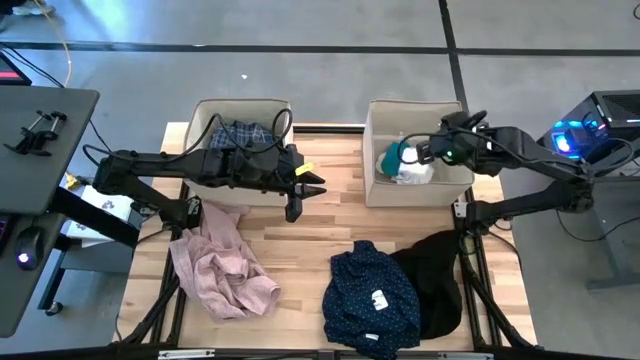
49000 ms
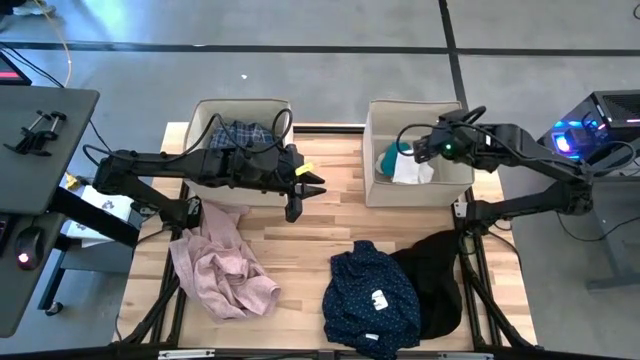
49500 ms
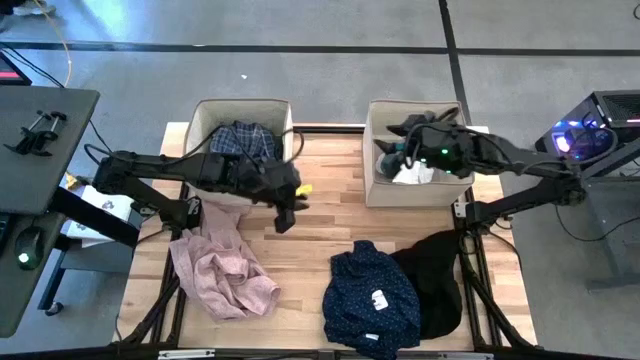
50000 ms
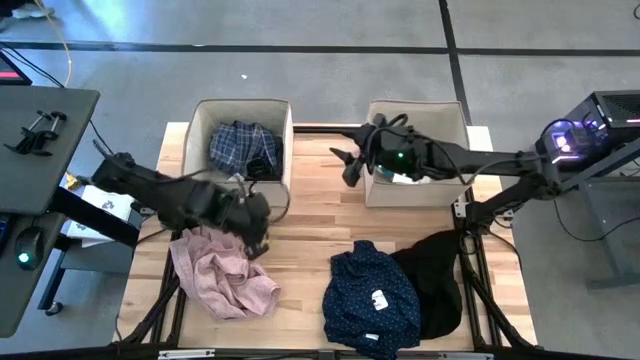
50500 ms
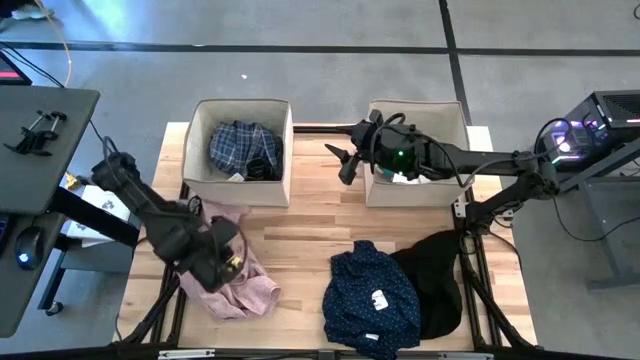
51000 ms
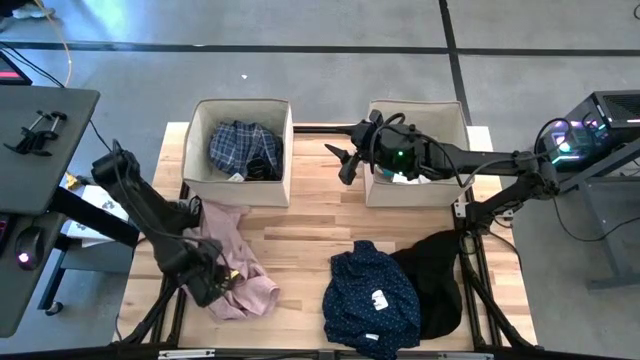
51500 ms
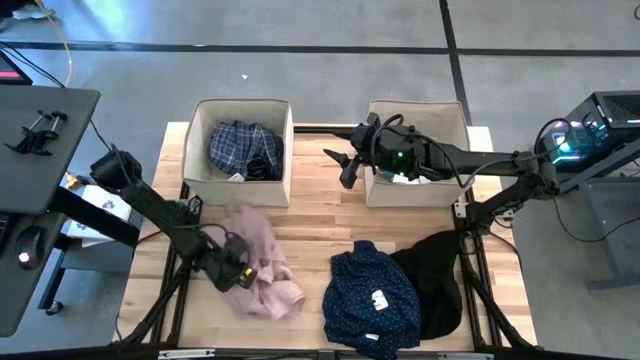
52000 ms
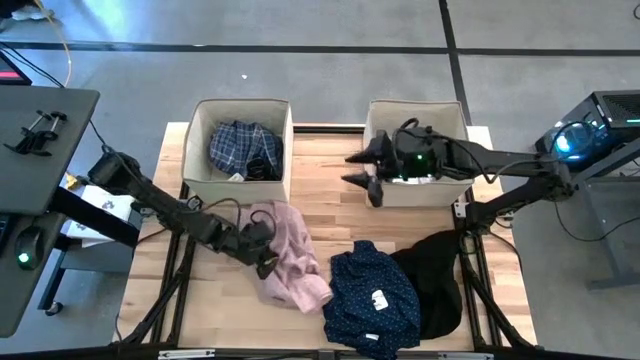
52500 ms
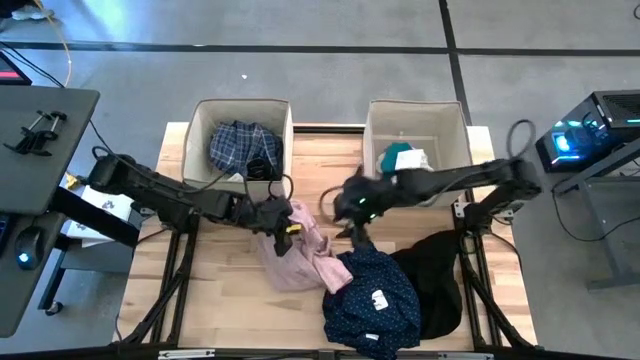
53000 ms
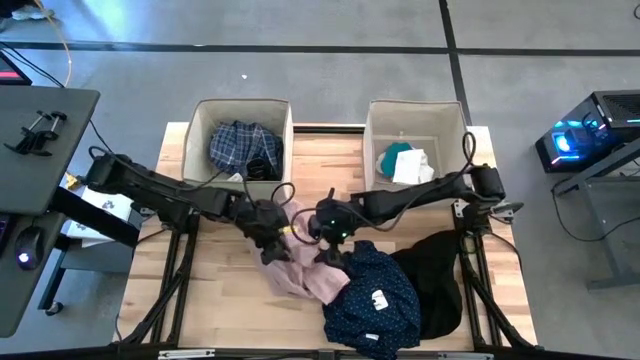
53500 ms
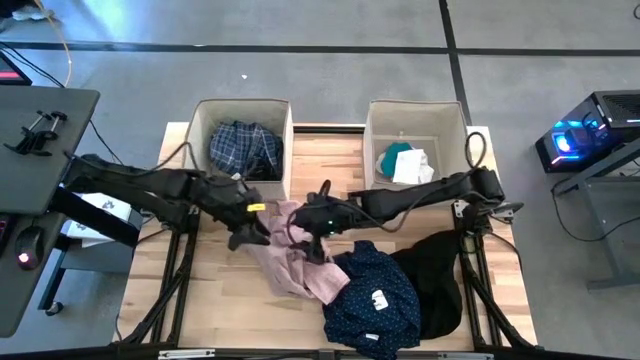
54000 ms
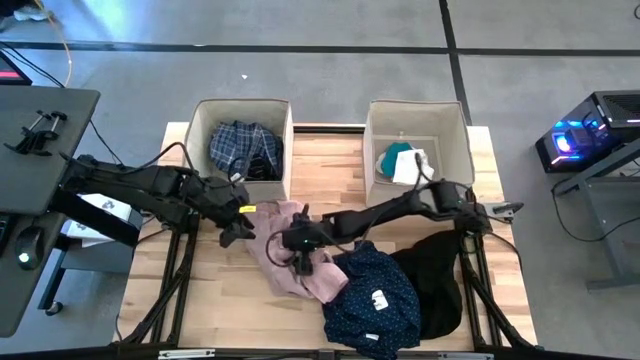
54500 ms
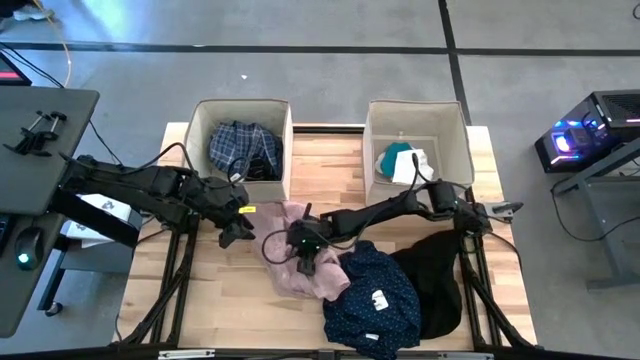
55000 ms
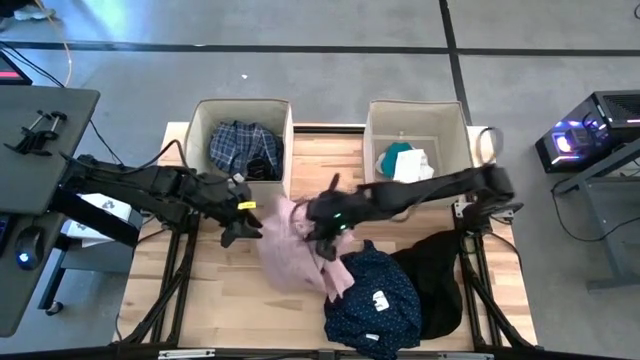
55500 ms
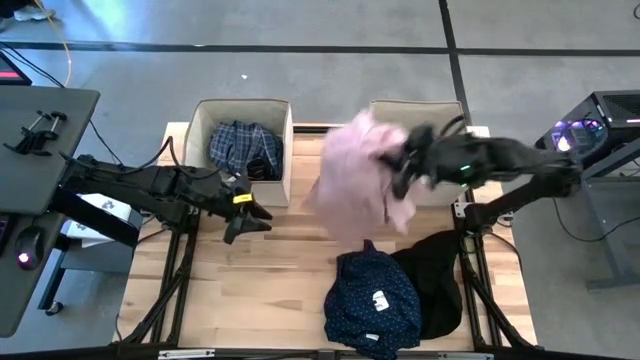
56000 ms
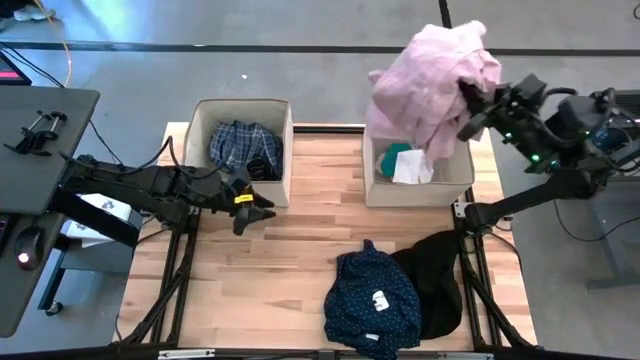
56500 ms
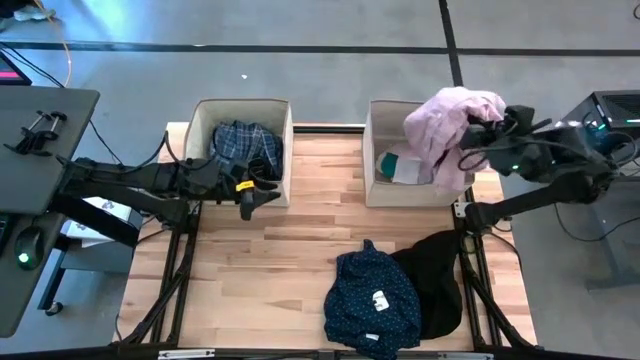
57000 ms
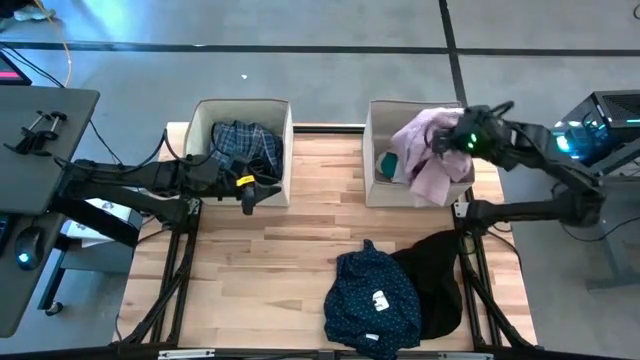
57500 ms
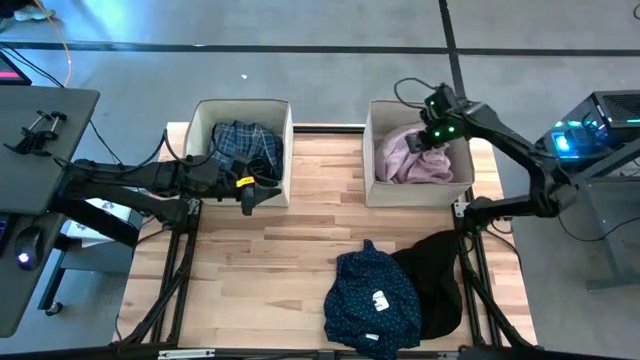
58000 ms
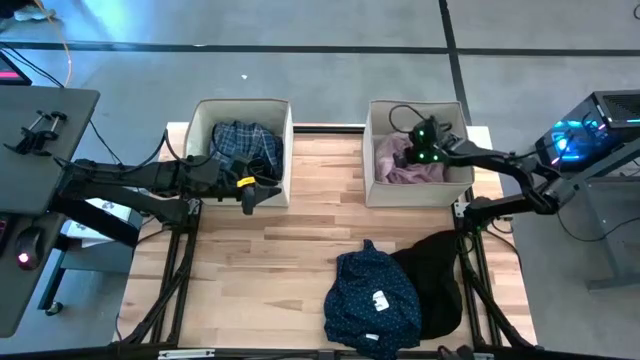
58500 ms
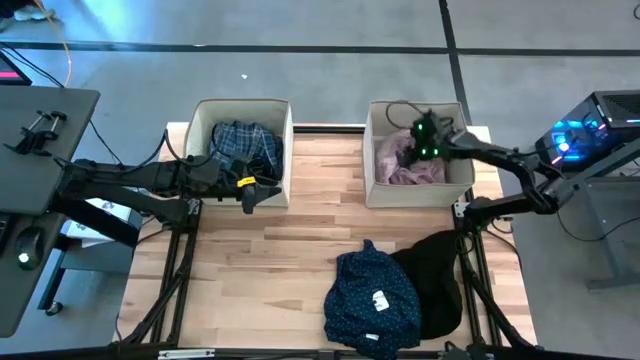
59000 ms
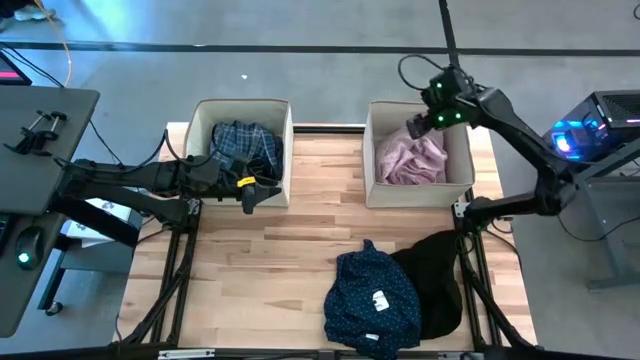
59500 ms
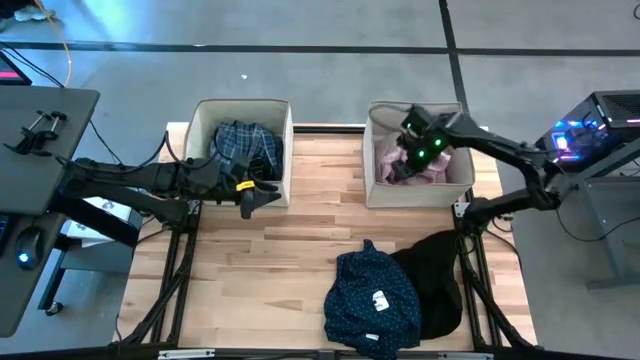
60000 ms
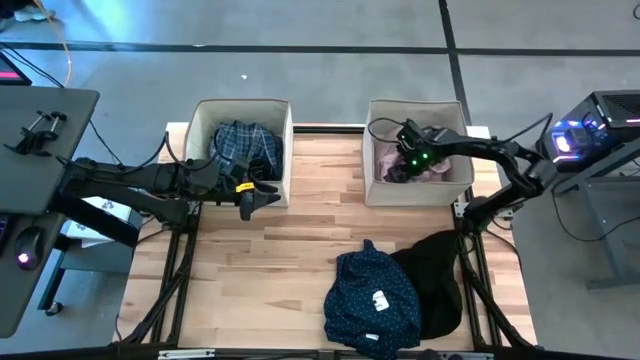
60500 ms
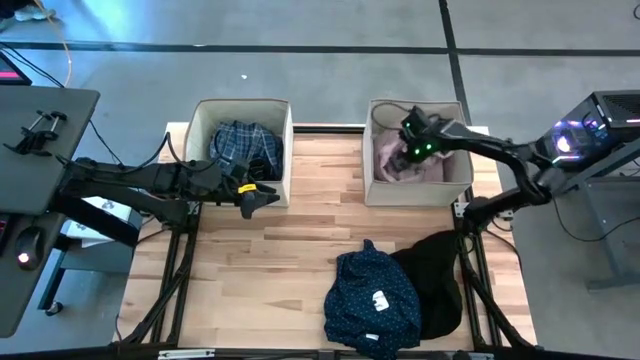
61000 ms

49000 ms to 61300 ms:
Task: Sort clothes
Put the pink cloth into the right laundry organizer

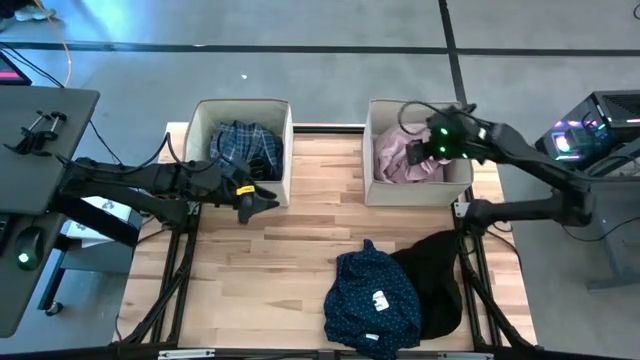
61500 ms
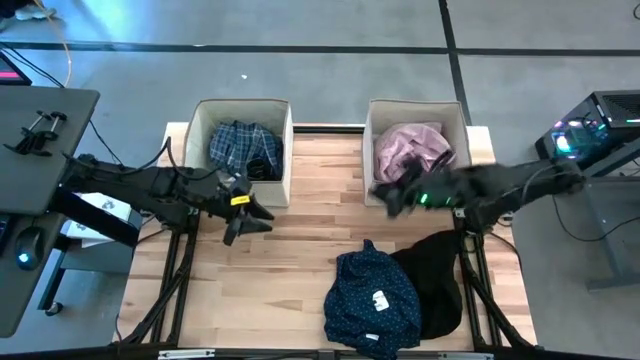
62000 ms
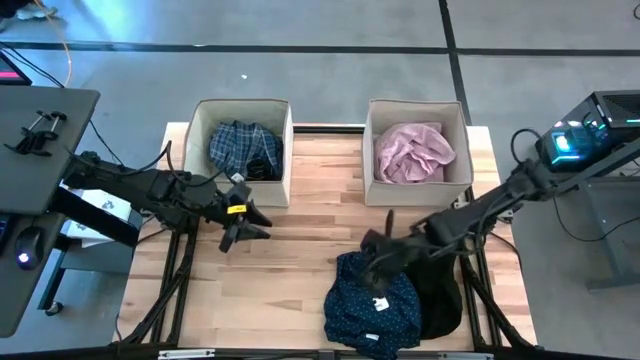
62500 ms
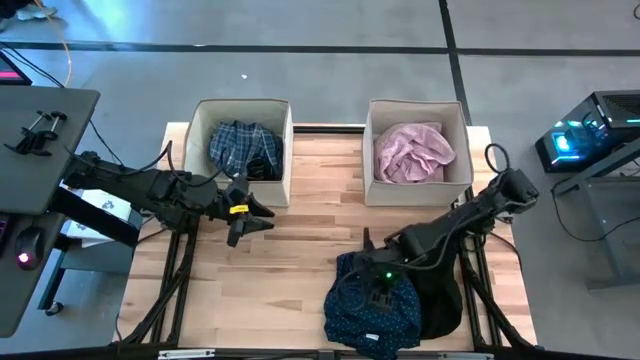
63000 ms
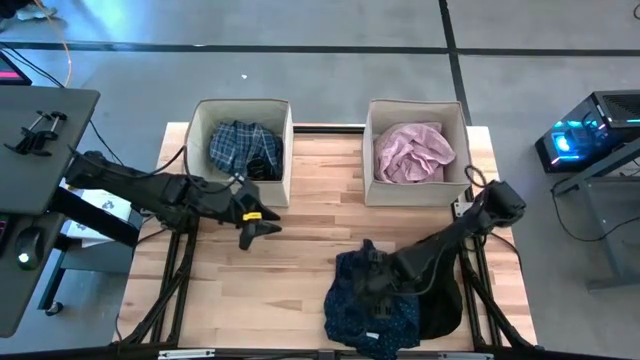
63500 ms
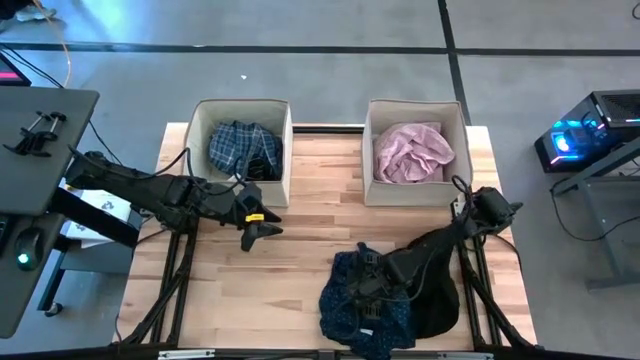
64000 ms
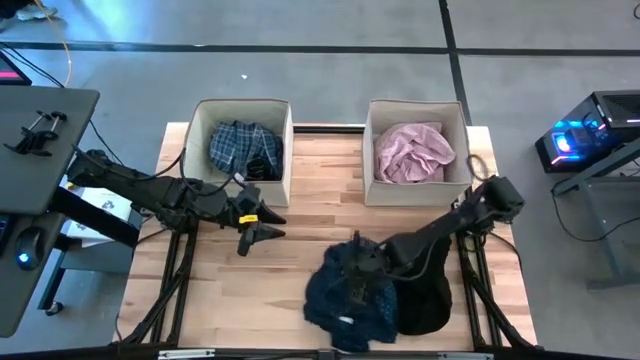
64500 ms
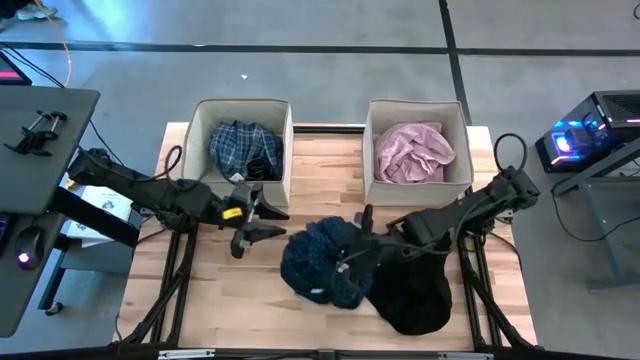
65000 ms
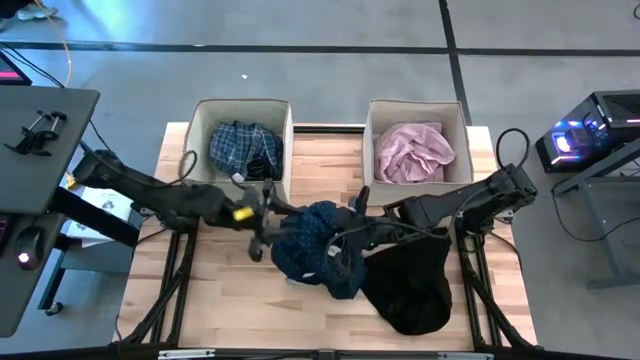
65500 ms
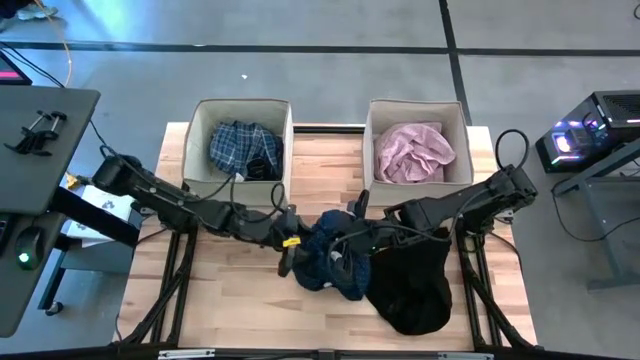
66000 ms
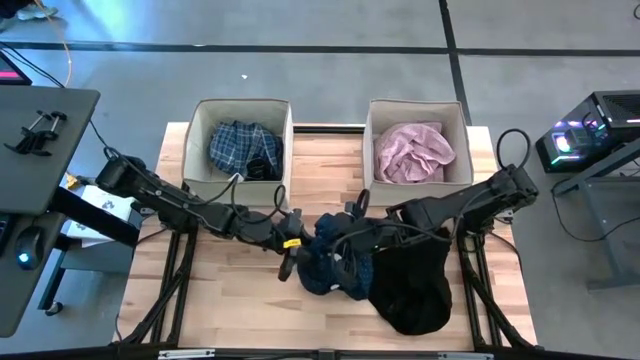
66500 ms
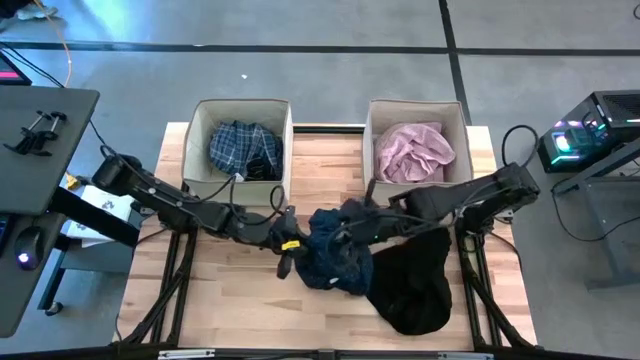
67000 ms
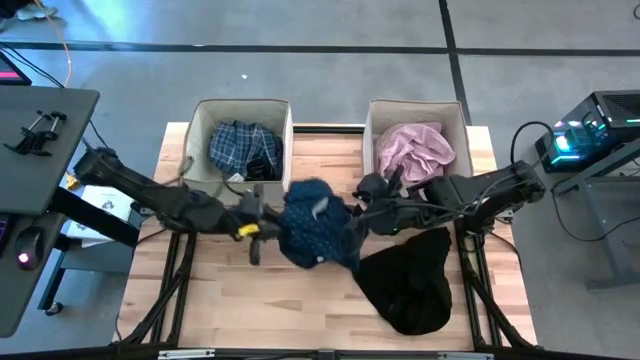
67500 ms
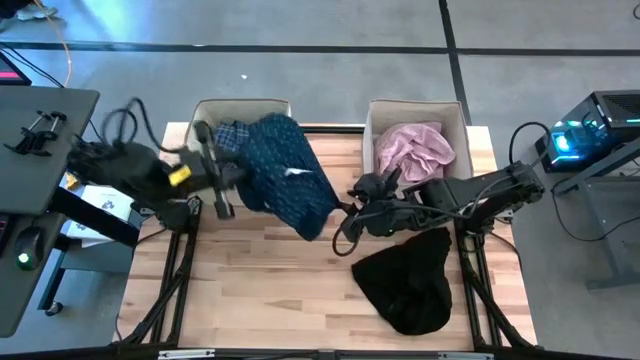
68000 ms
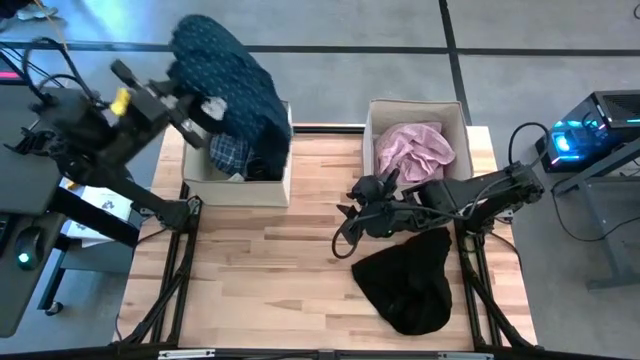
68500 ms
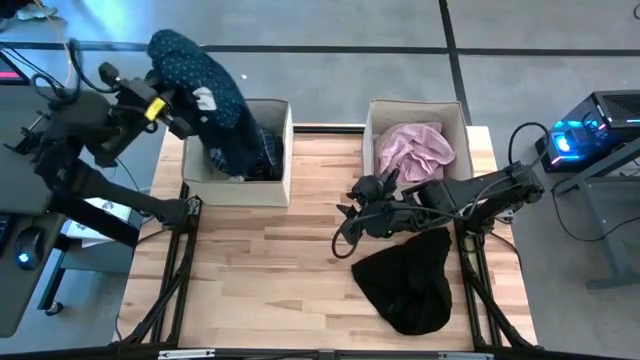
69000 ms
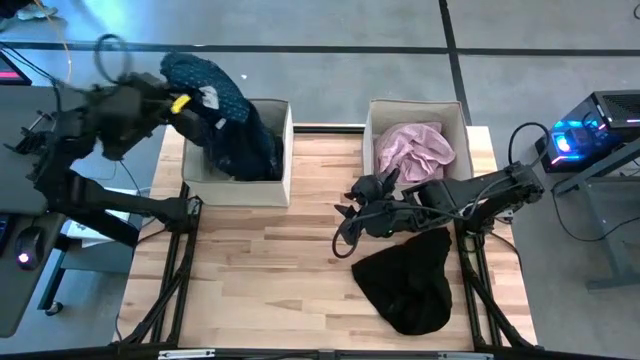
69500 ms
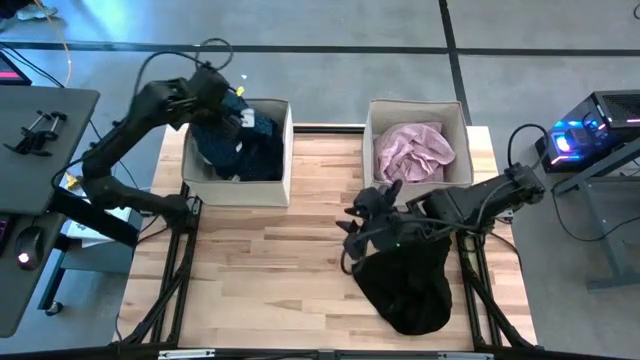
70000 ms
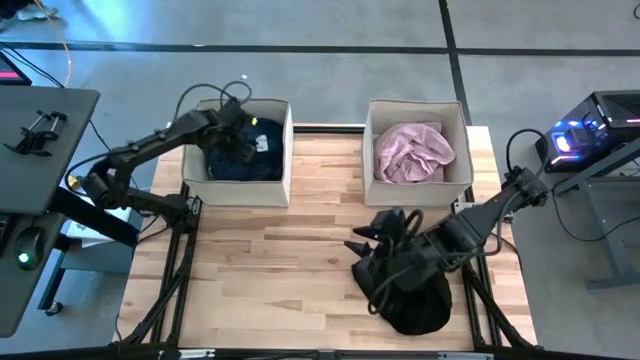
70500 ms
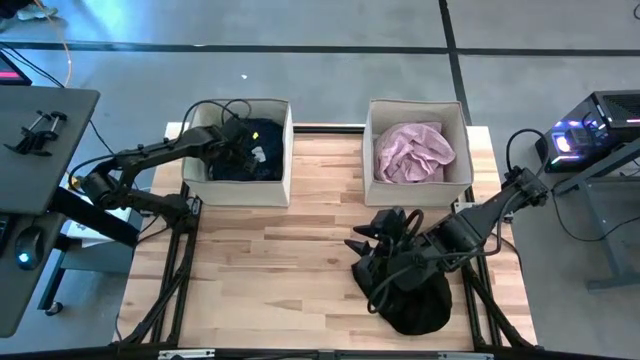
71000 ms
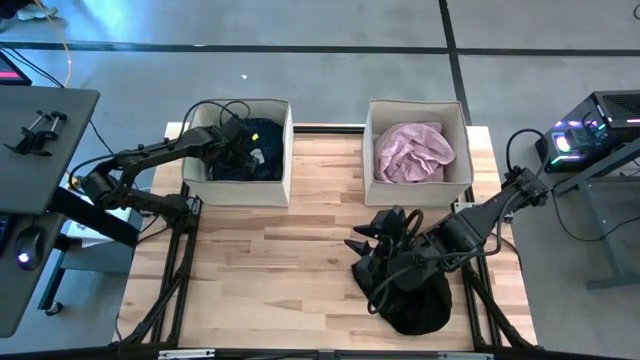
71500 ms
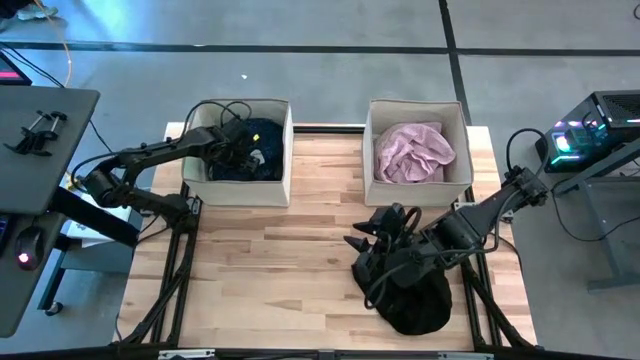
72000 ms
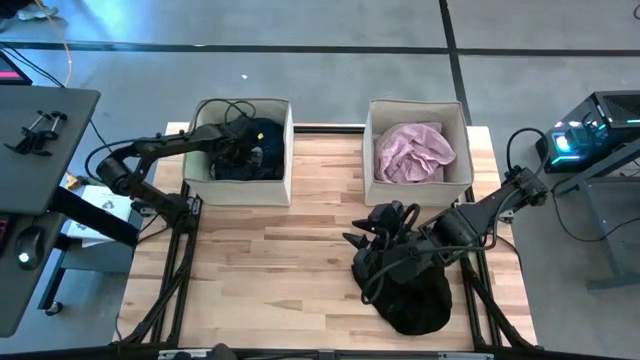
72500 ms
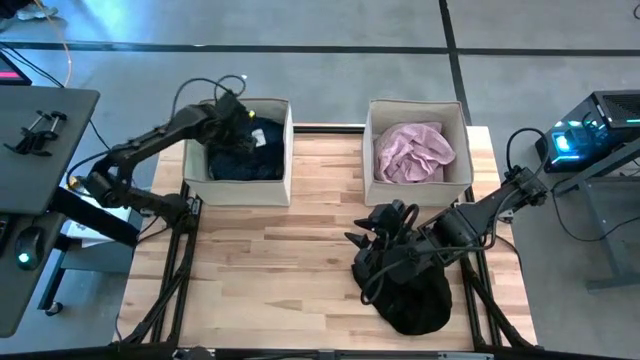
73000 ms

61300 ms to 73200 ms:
Put the navy blue dotted cloth into the left laundry organizer
